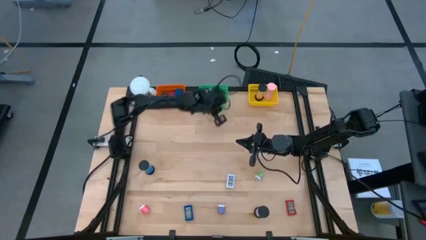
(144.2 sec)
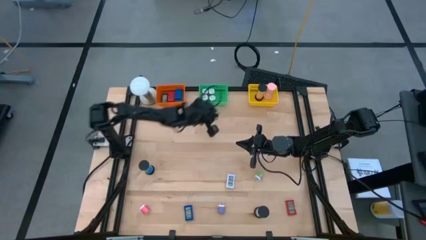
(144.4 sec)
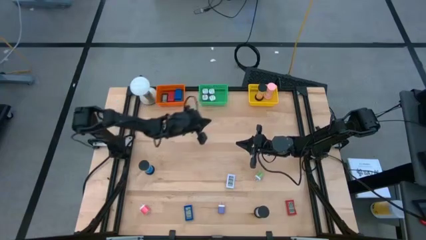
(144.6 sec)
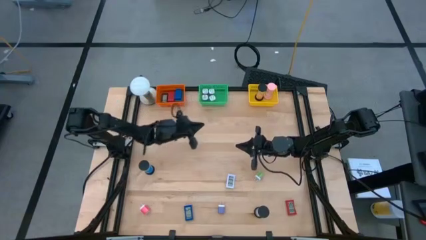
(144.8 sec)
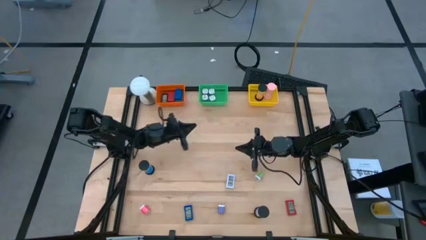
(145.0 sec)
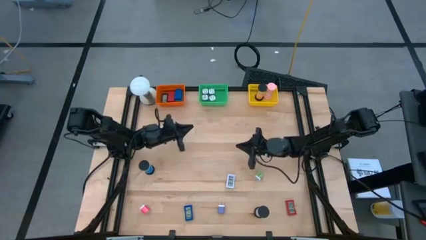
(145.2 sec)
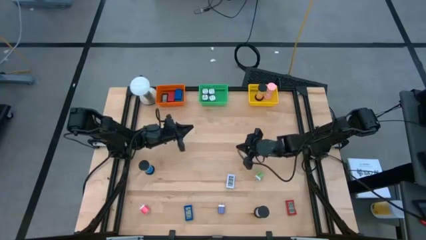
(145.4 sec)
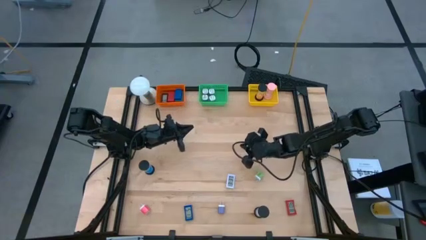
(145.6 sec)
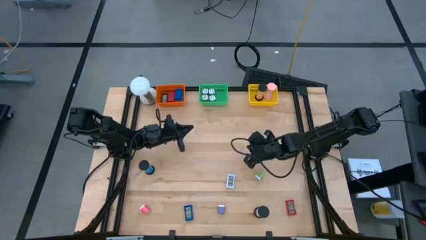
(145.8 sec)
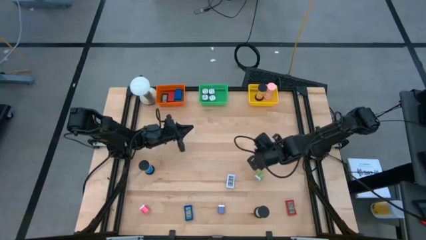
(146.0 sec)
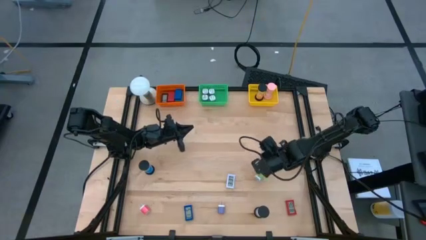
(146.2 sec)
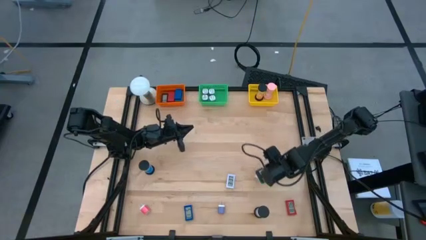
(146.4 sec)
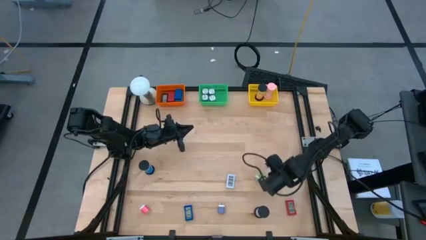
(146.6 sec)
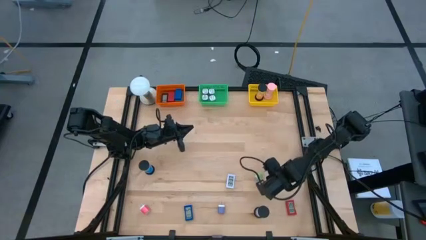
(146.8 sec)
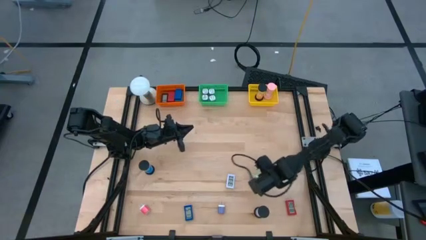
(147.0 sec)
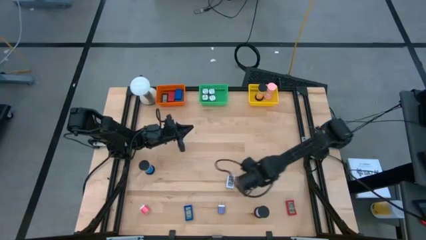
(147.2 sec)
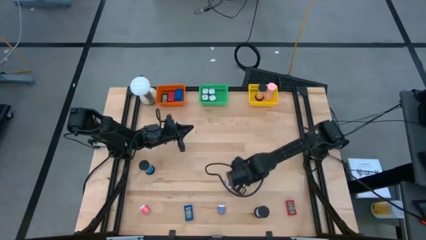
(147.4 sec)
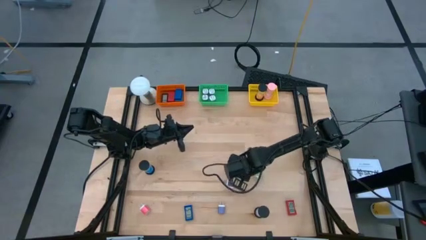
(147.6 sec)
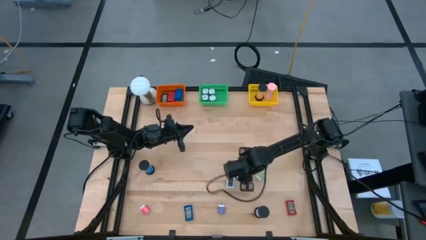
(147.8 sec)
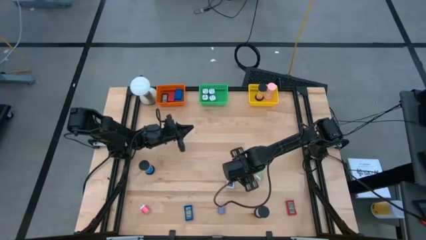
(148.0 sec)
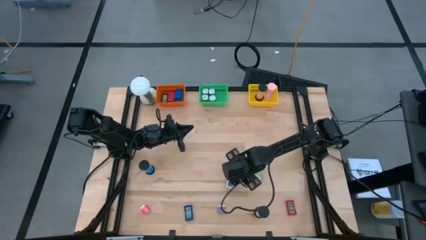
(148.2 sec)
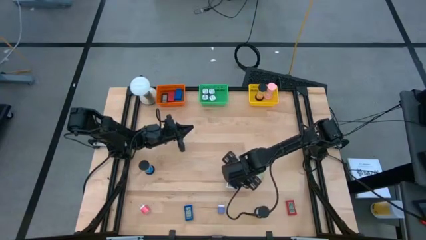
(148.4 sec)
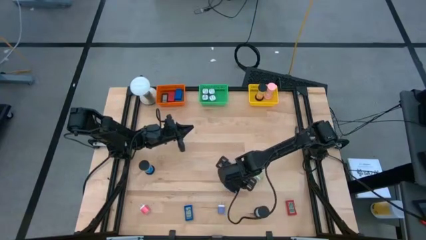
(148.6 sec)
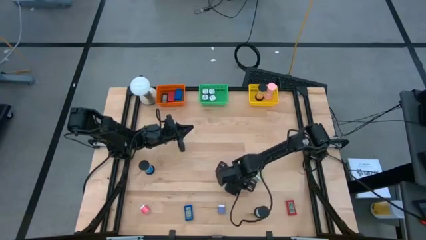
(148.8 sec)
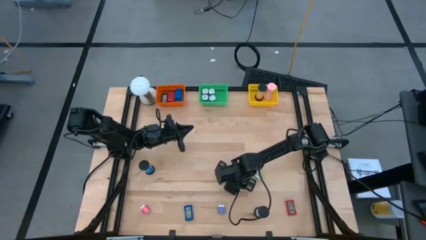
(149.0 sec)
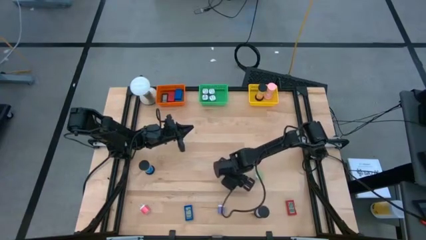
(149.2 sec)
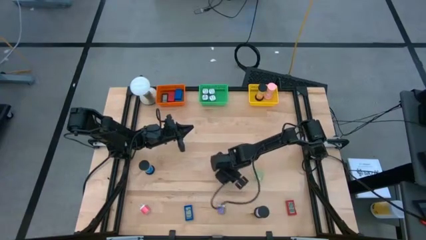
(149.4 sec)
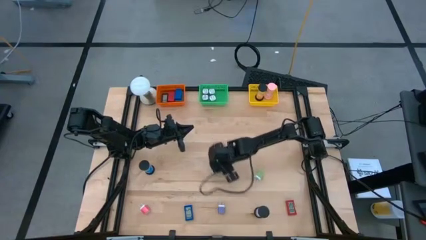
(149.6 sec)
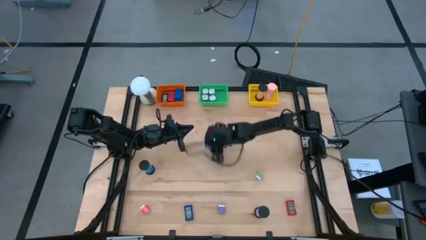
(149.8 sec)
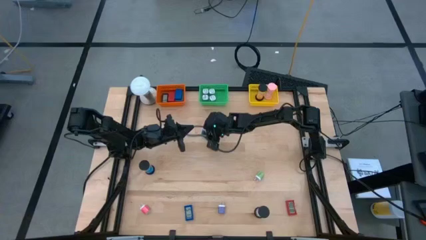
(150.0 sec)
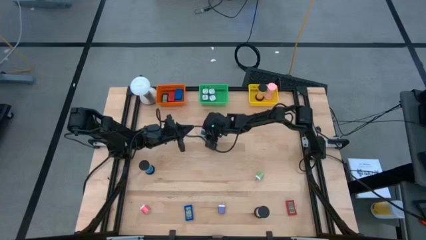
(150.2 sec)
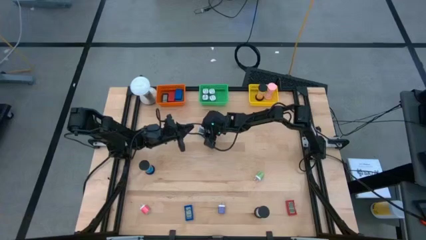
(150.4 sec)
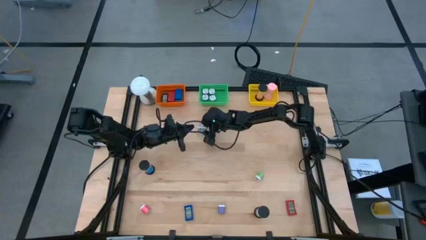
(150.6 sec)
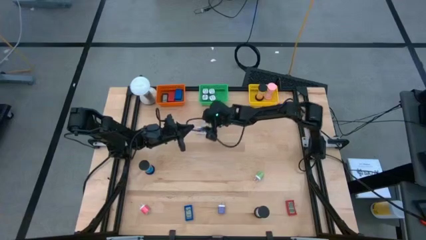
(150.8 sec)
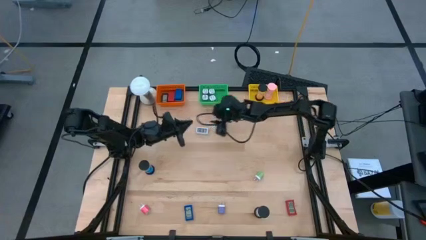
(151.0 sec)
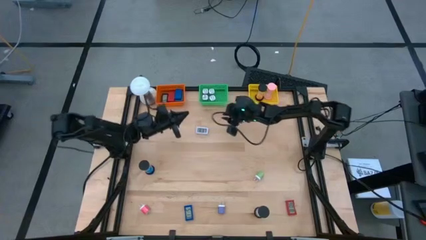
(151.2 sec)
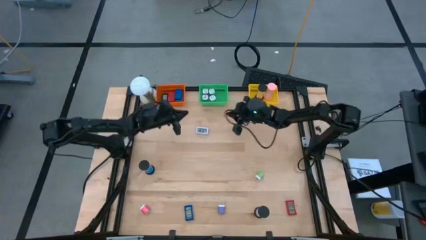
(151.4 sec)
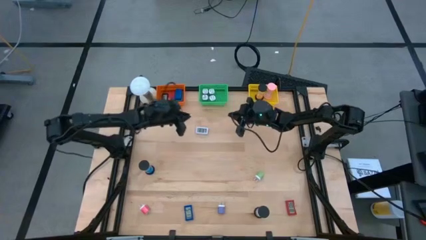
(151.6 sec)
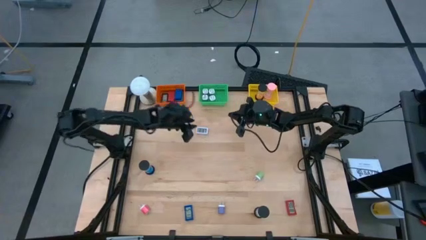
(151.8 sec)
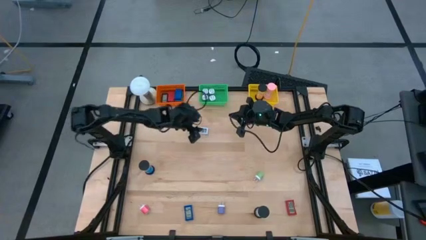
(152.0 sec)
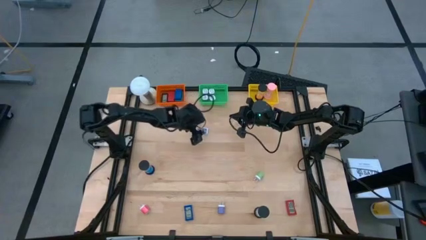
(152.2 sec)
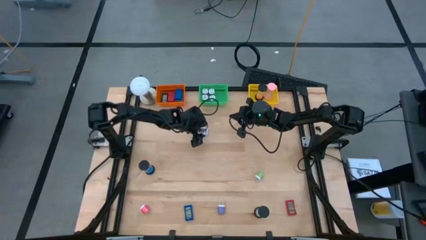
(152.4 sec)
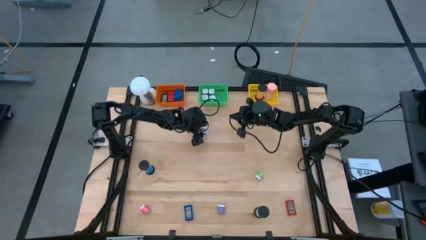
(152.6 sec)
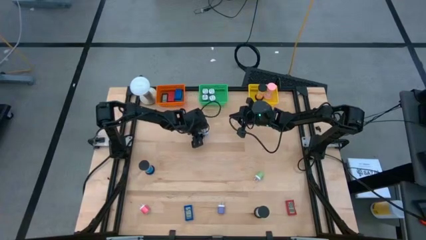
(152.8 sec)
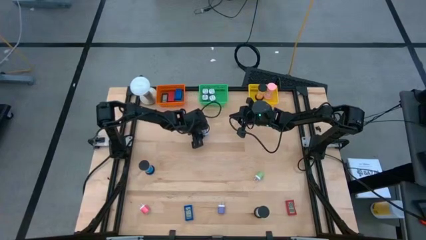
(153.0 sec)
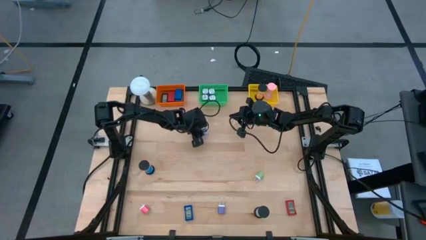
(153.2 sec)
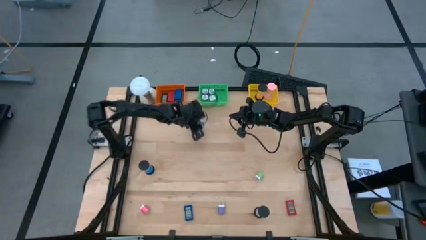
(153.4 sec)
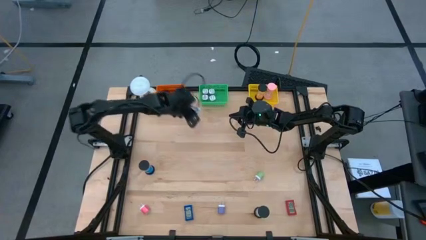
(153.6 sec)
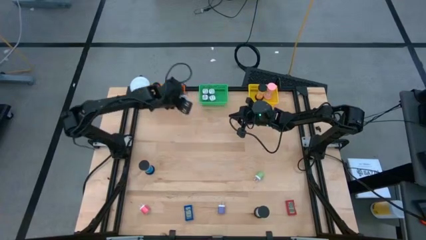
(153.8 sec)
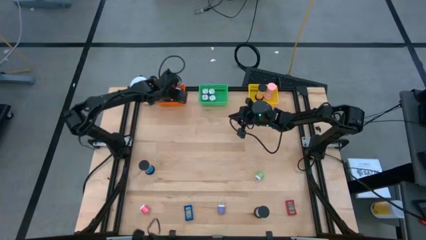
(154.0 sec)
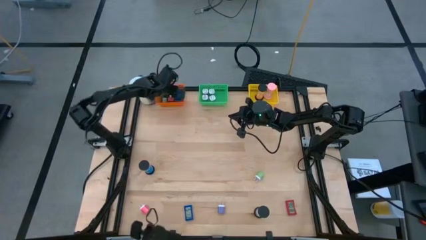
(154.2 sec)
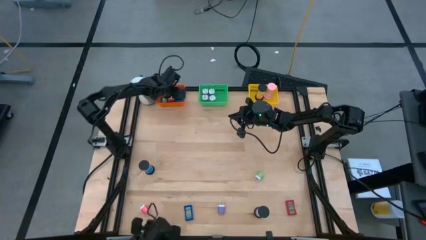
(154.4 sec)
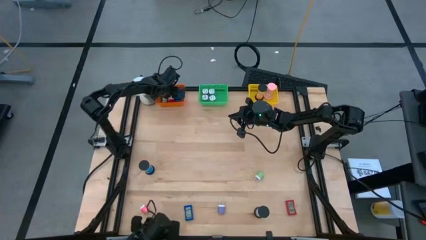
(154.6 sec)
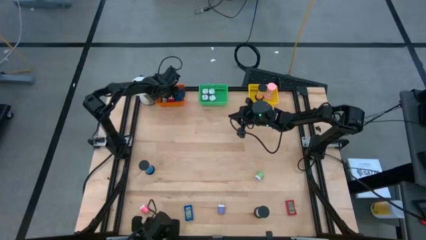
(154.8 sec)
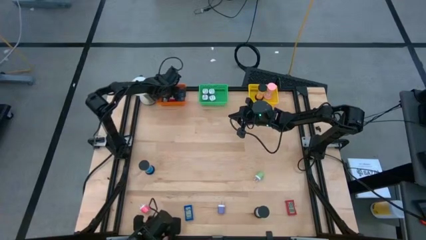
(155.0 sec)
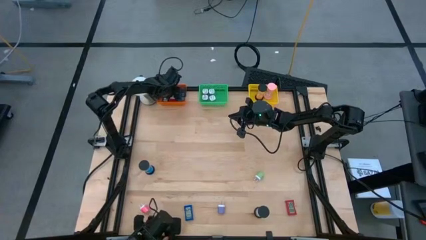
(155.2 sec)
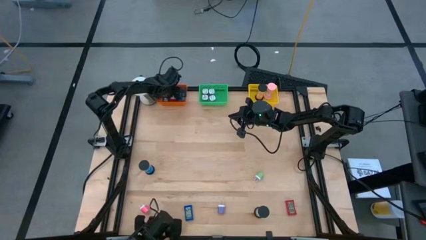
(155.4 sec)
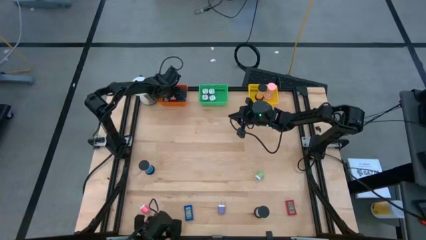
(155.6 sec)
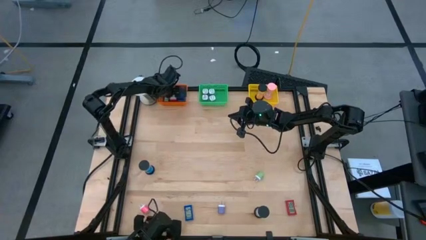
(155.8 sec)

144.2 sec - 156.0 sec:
Task: Pick & Place Office items
Put the white digital clock into the orange basket
